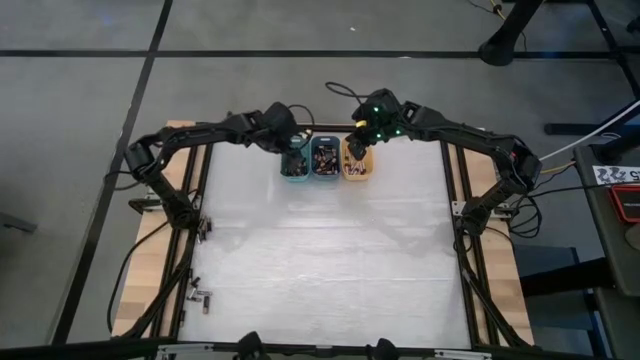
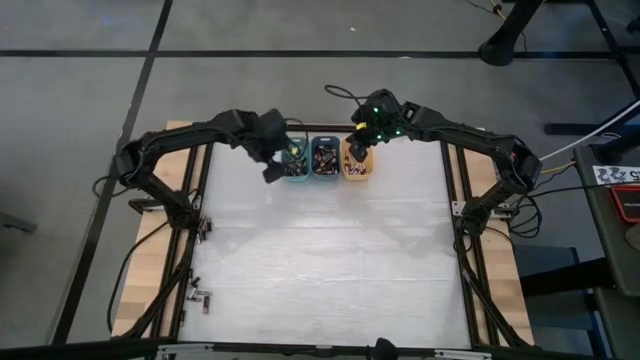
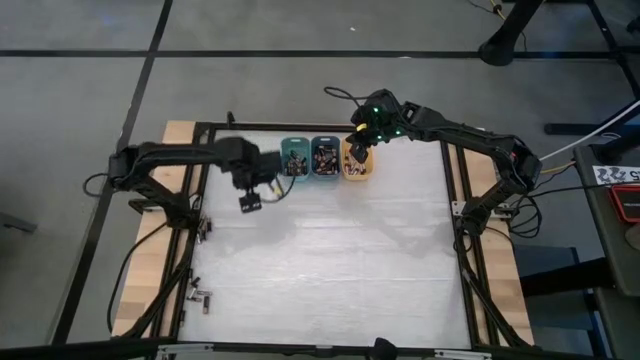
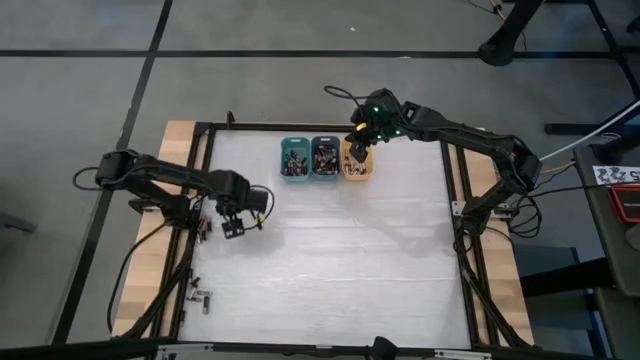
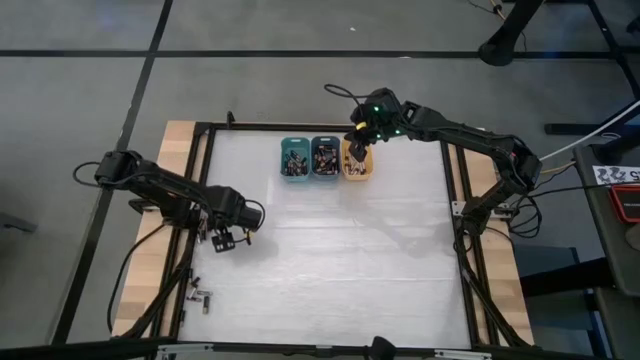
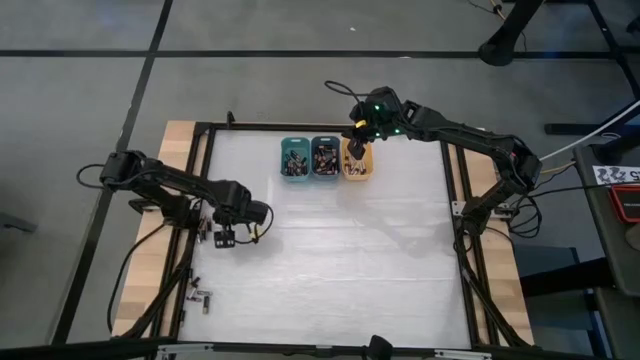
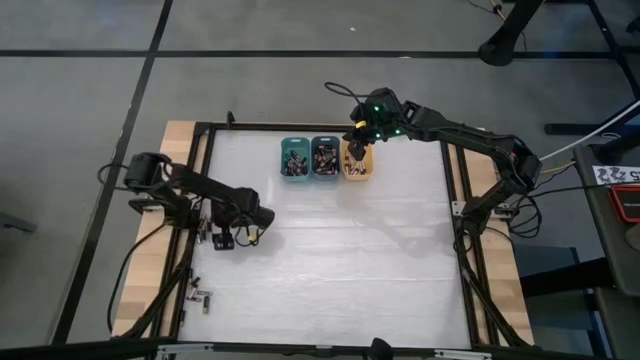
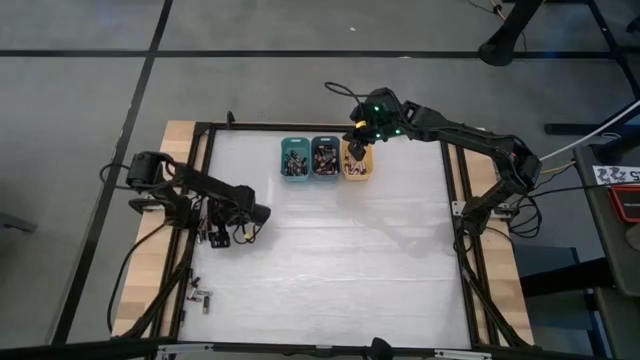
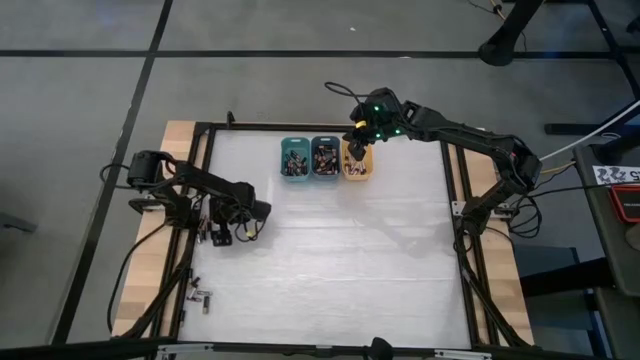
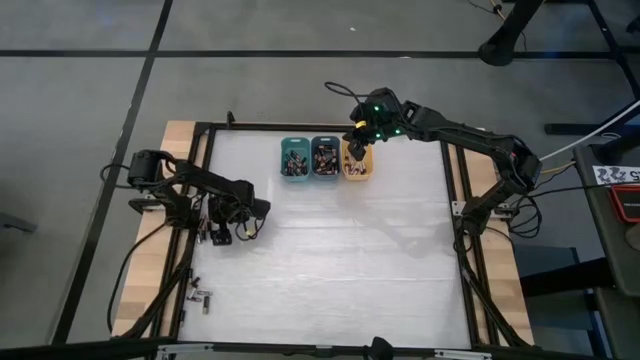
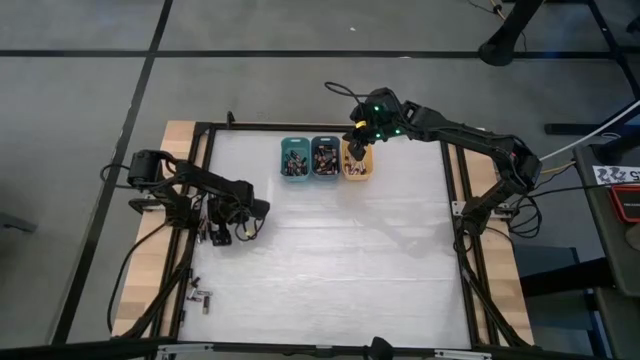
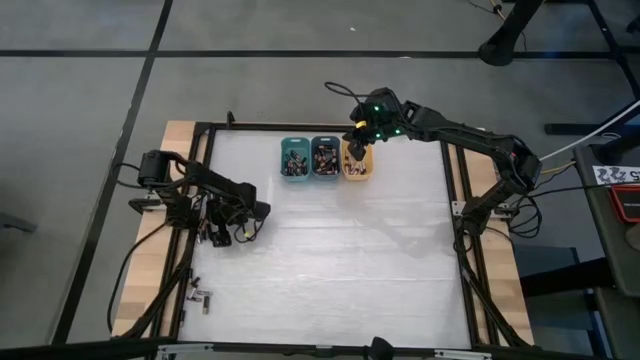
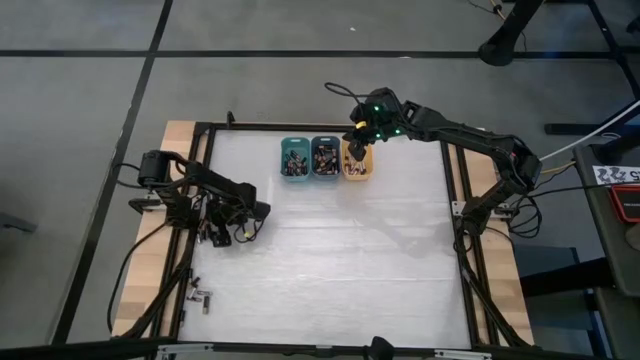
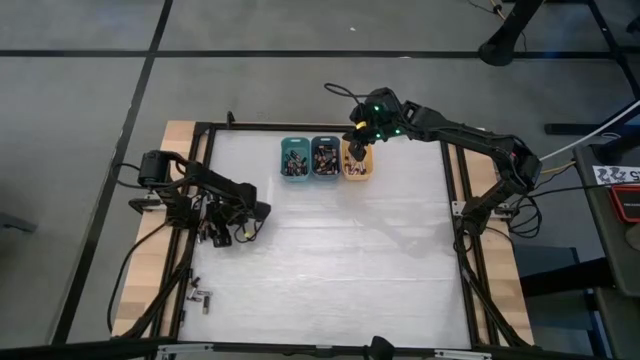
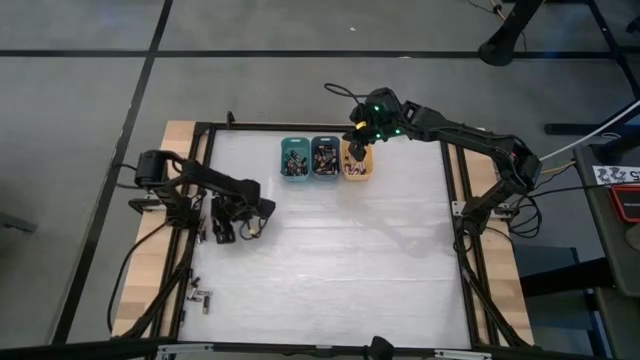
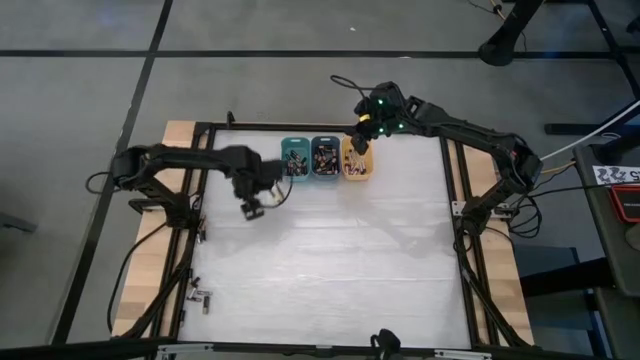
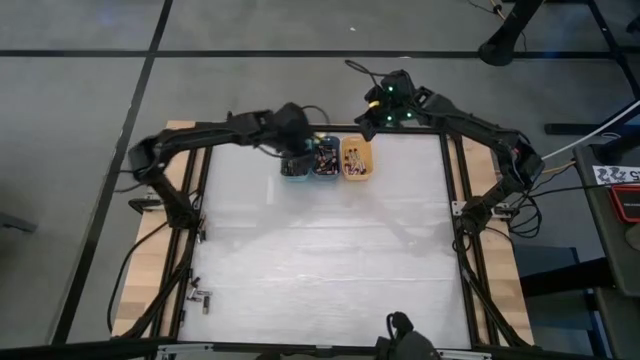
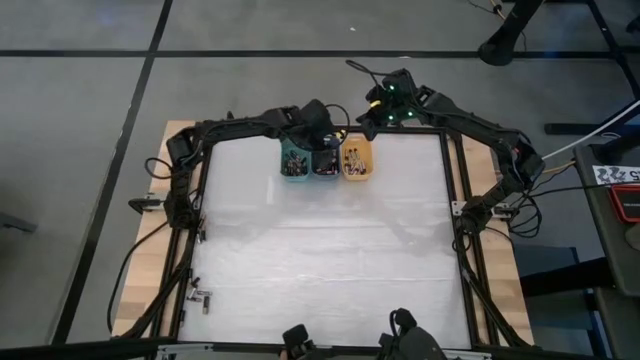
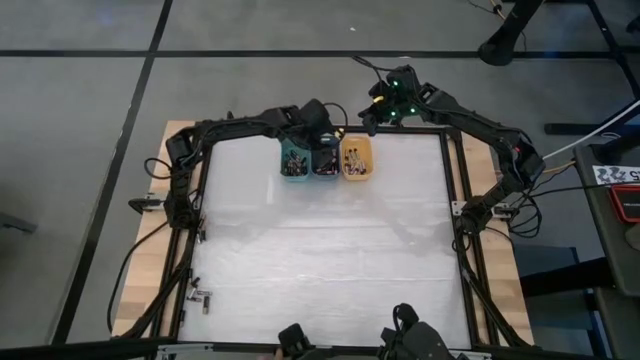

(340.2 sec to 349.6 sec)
Task: Sort batteries
Put the brown battery into the blue bin

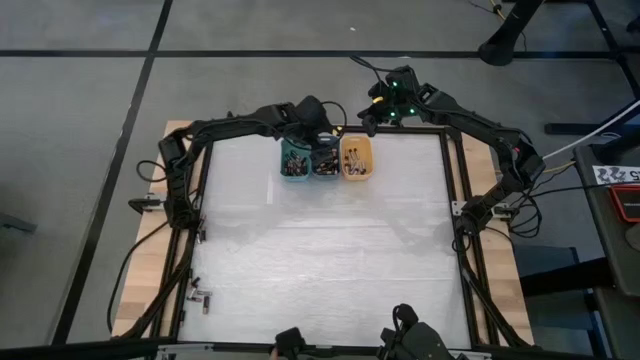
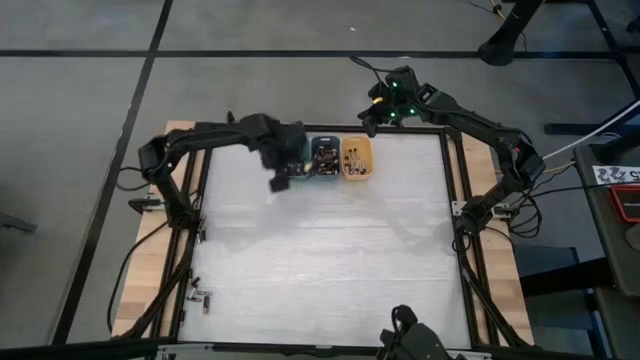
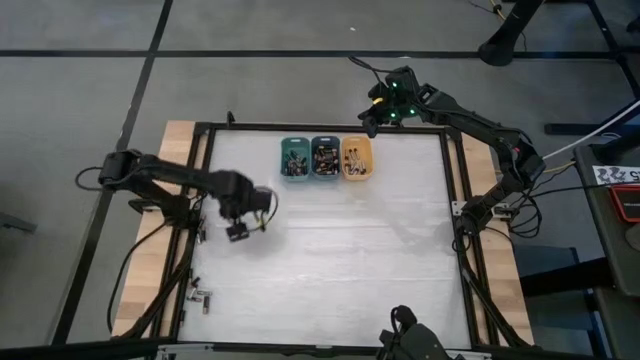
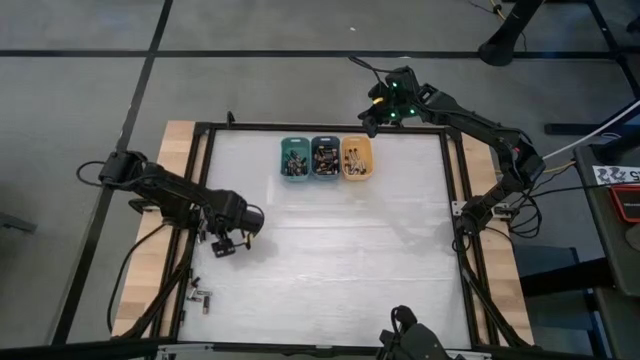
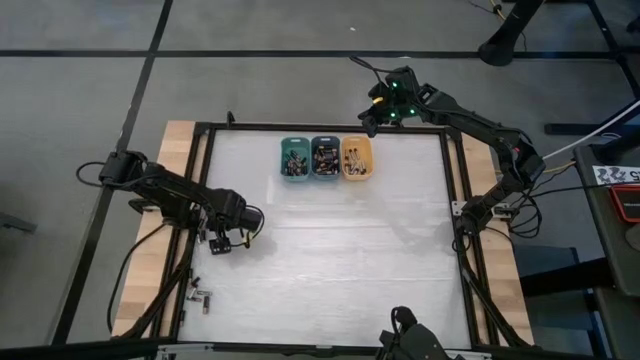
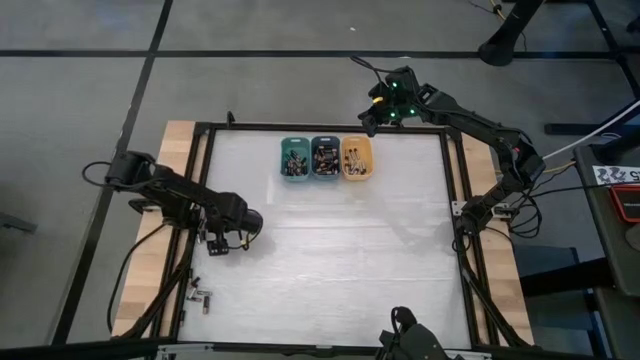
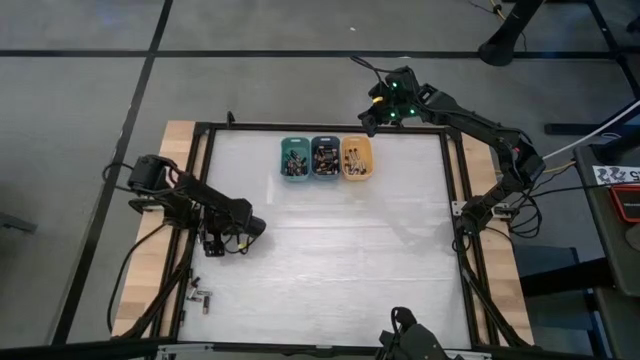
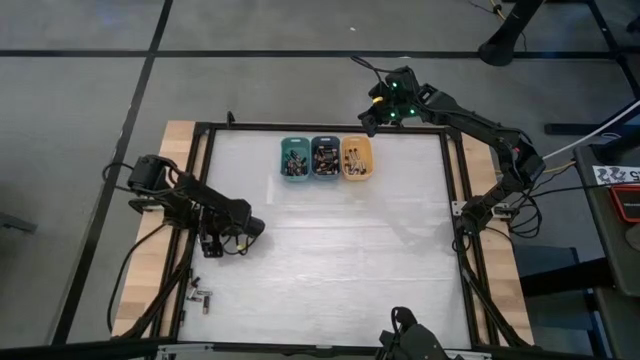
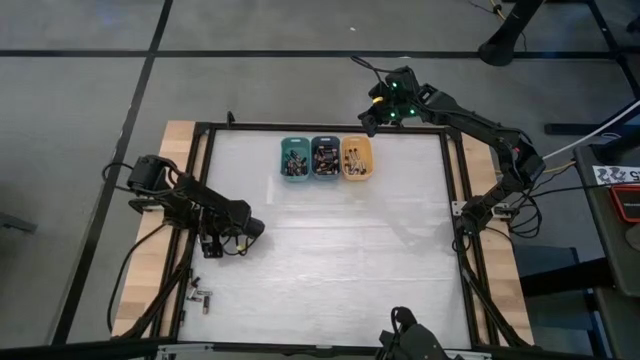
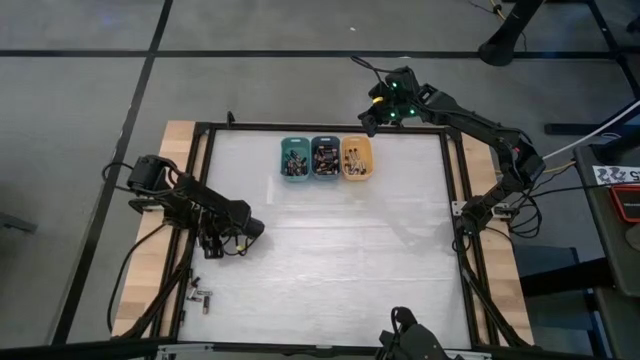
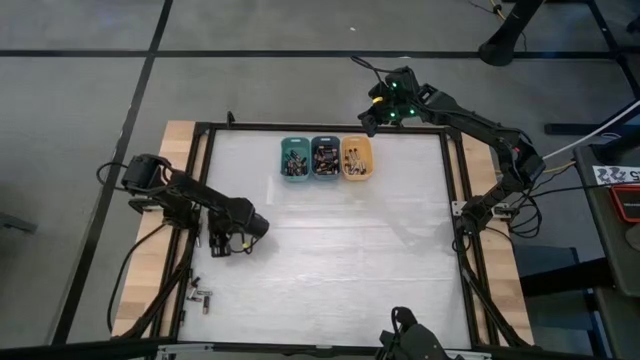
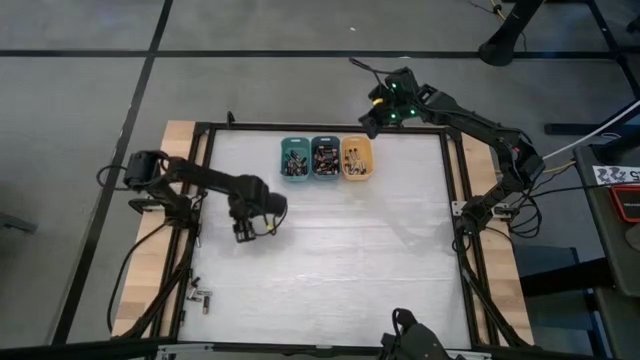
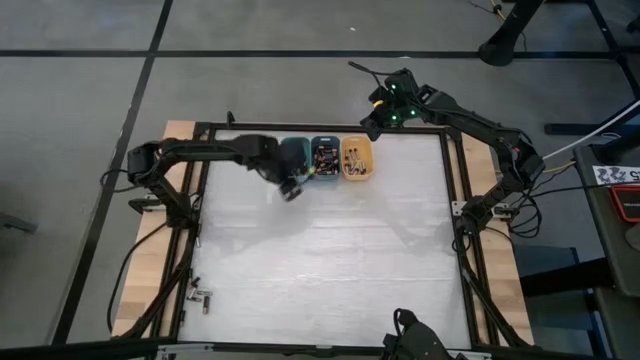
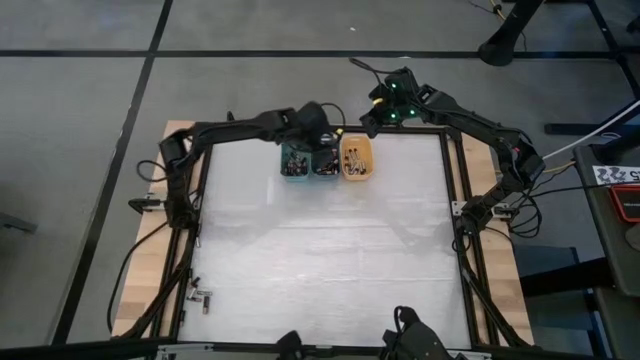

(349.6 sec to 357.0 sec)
Put the brown battery into the blue bin

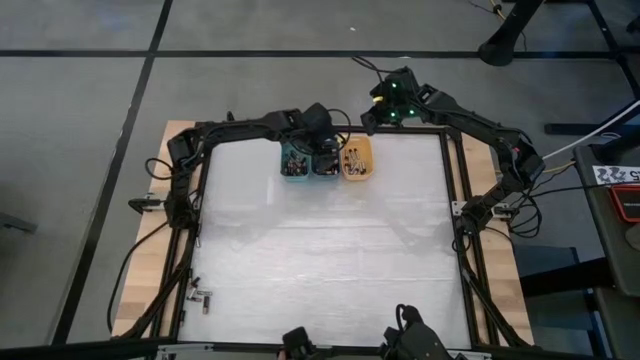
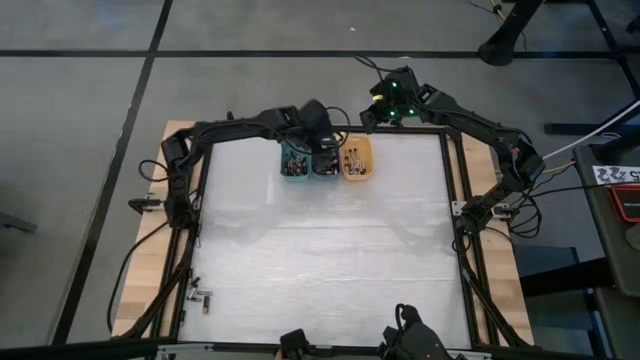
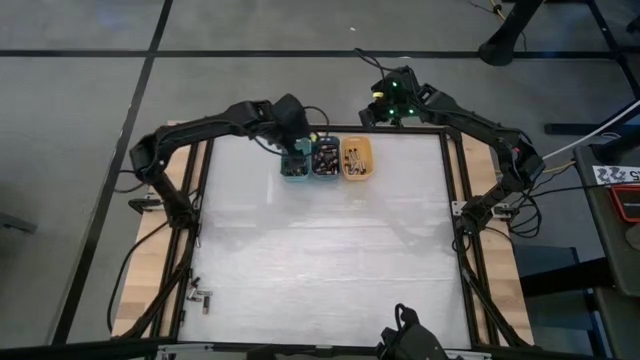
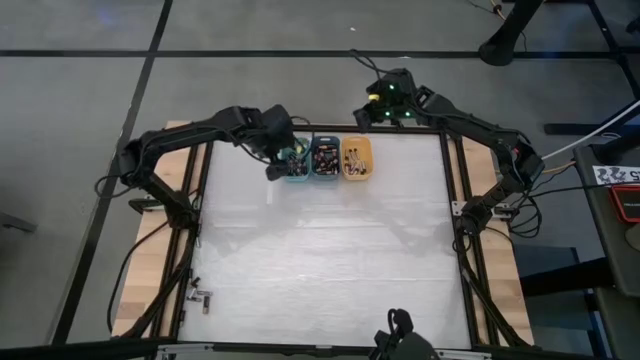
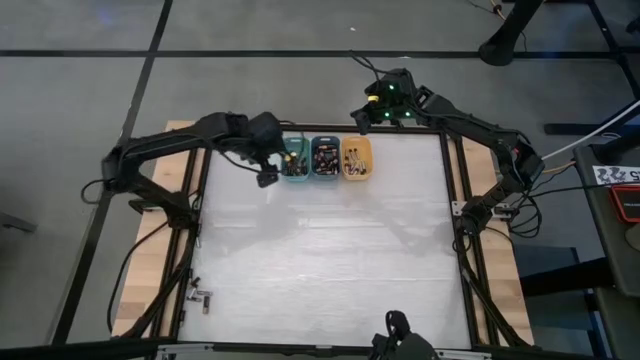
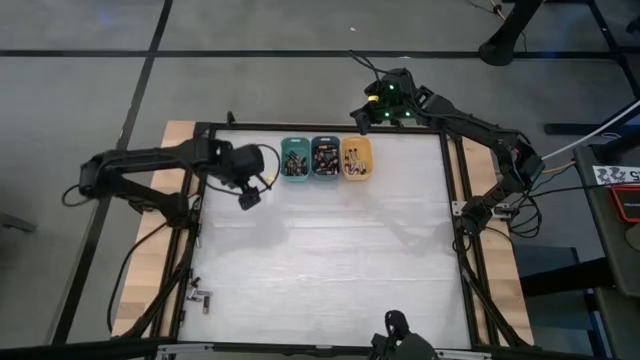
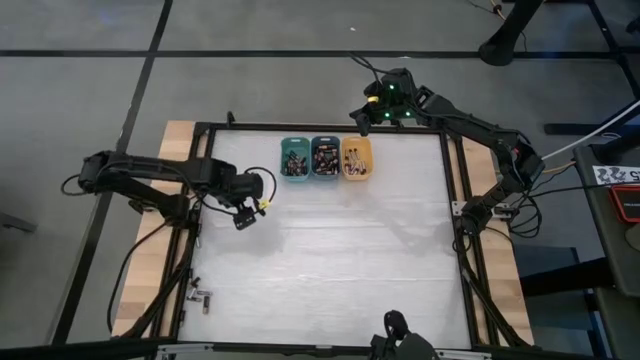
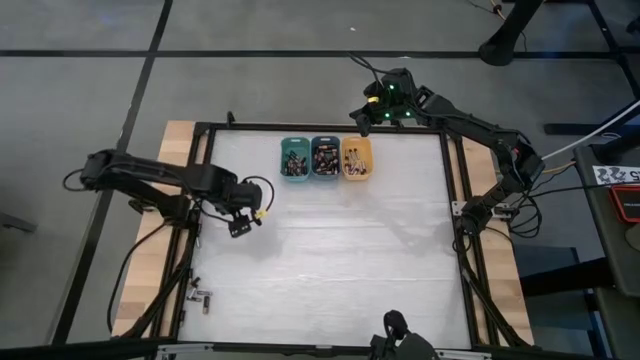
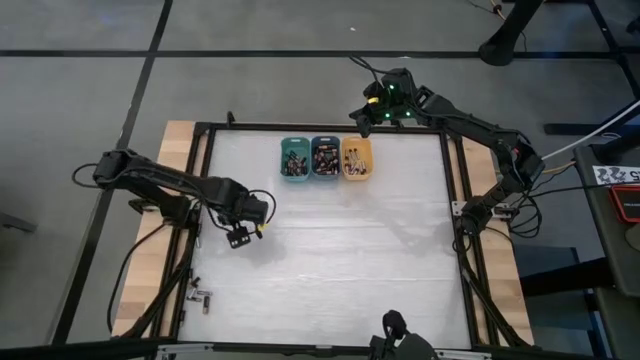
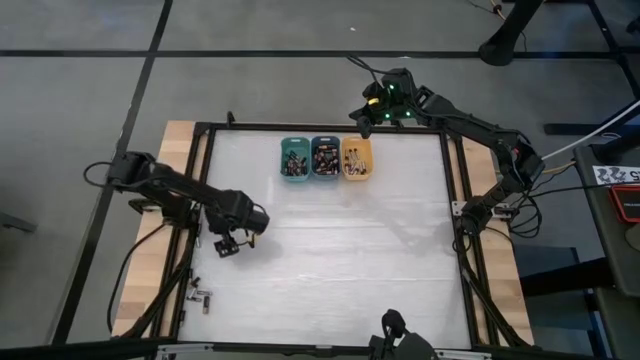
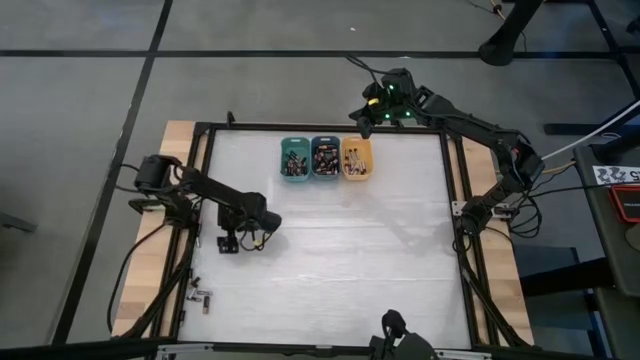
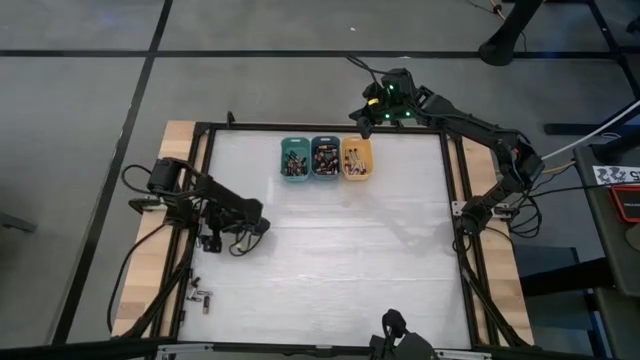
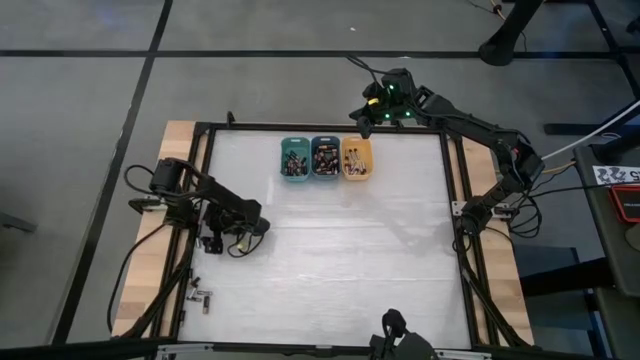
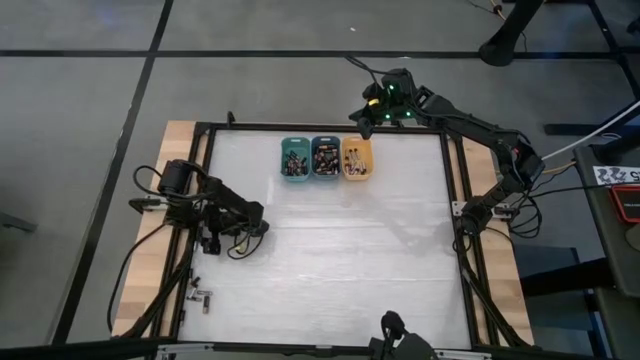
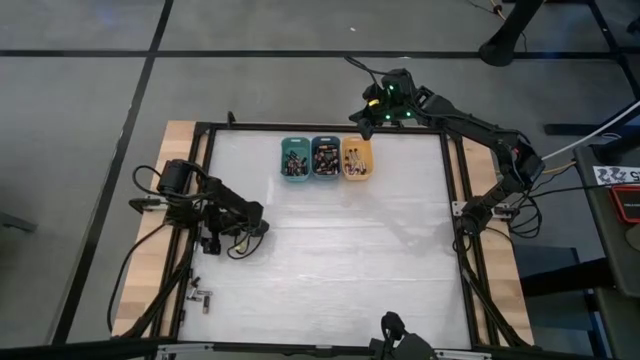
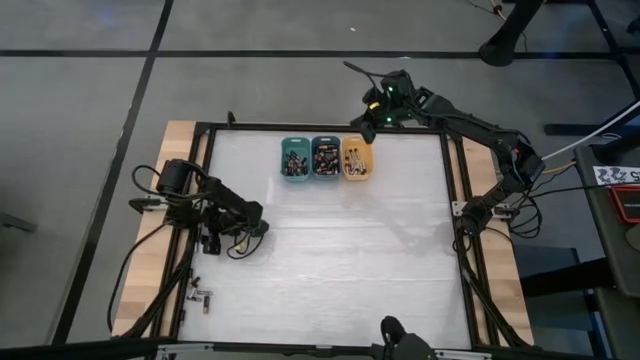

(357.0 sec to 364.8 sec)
Put the brown battery into the blue bin
